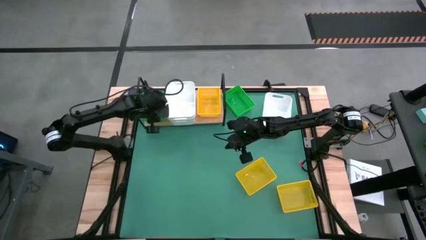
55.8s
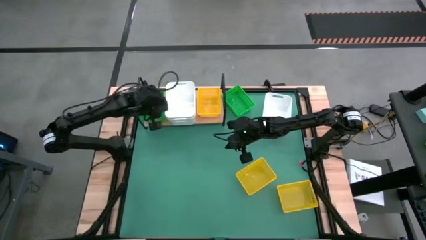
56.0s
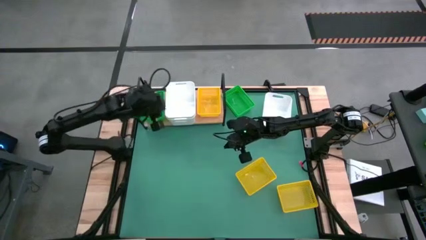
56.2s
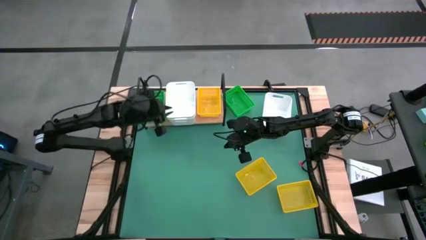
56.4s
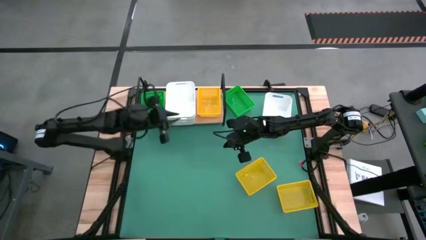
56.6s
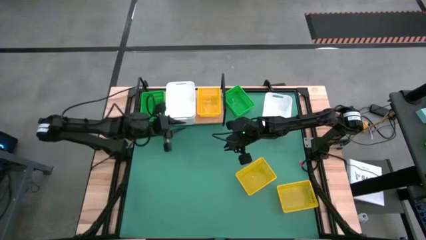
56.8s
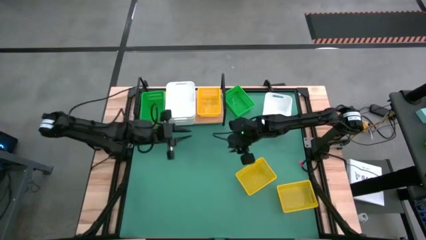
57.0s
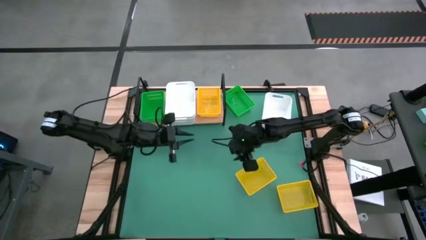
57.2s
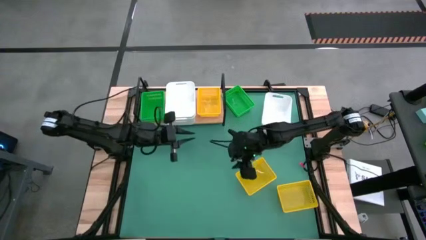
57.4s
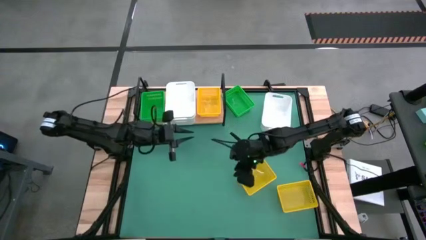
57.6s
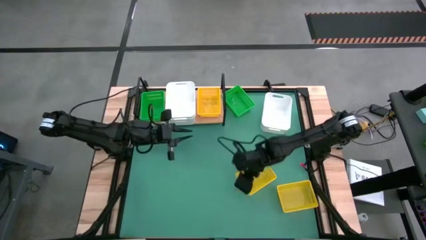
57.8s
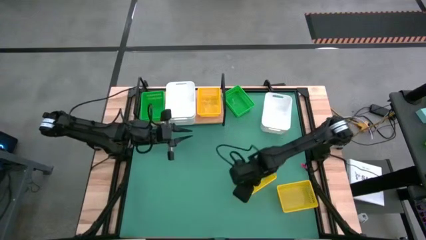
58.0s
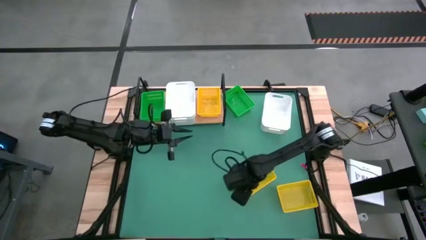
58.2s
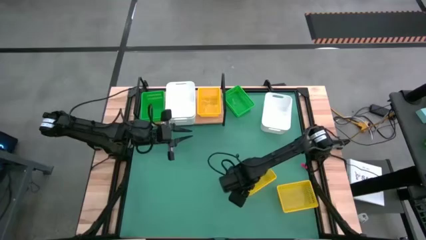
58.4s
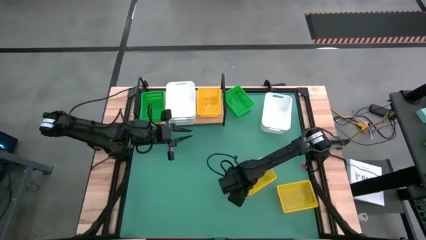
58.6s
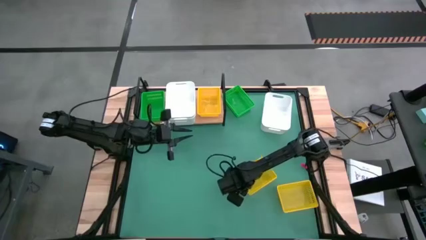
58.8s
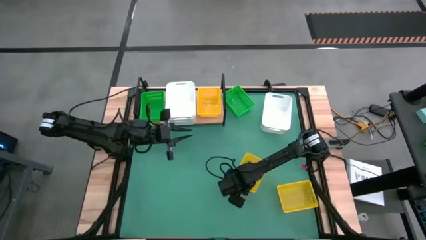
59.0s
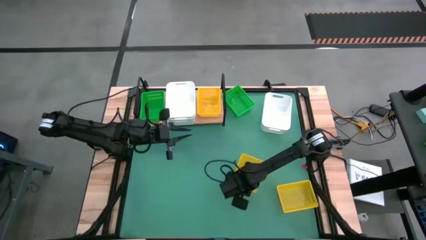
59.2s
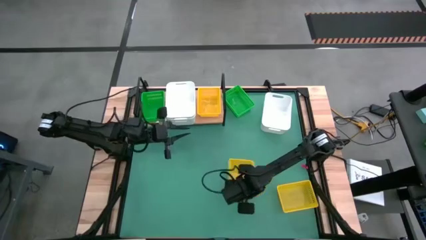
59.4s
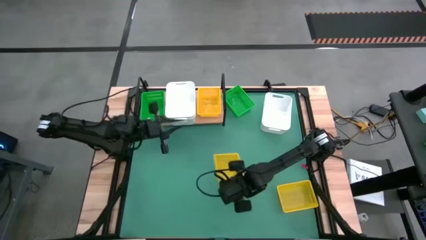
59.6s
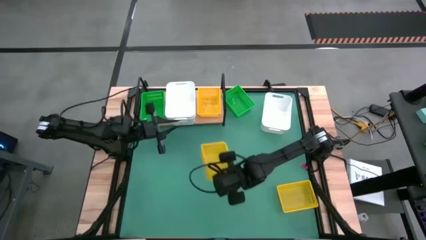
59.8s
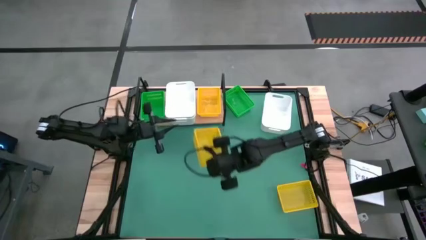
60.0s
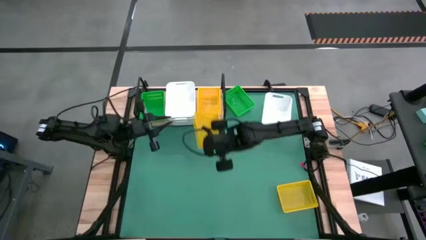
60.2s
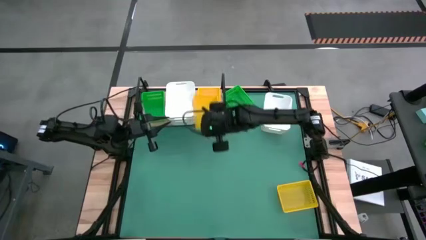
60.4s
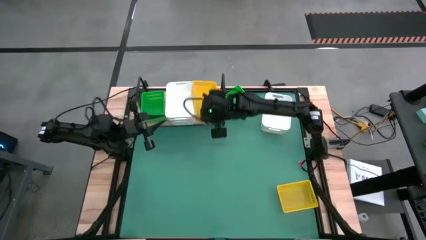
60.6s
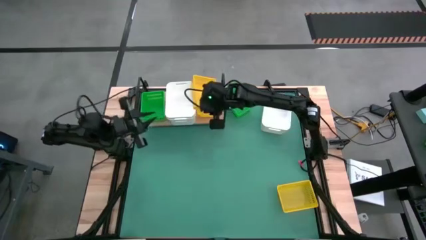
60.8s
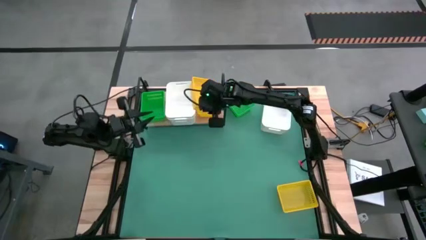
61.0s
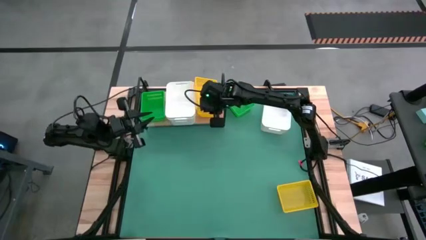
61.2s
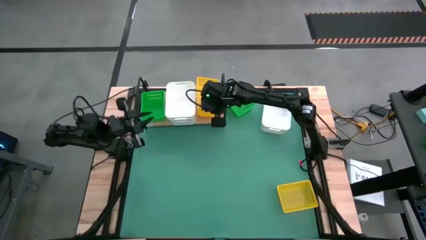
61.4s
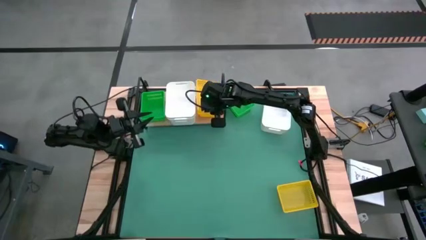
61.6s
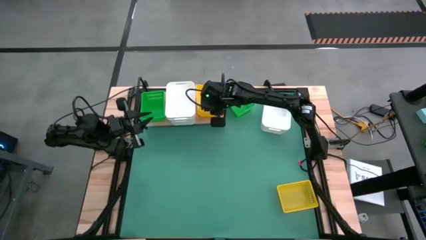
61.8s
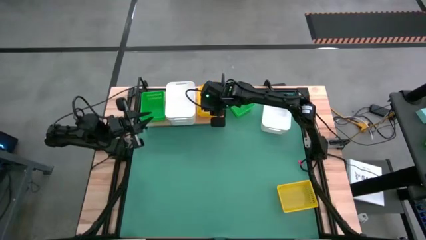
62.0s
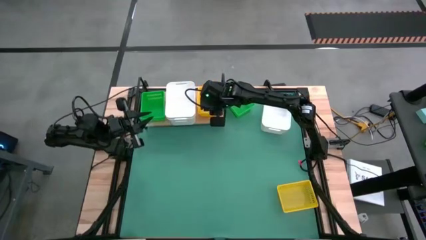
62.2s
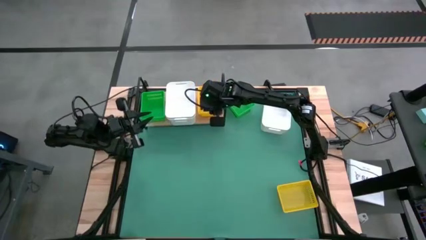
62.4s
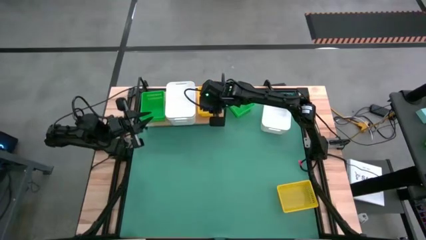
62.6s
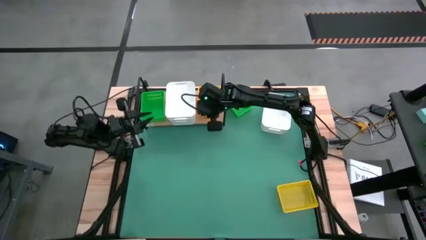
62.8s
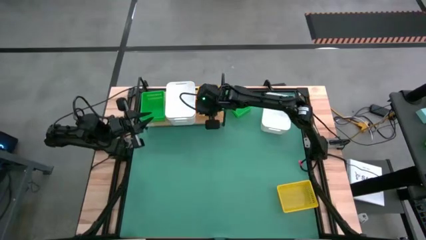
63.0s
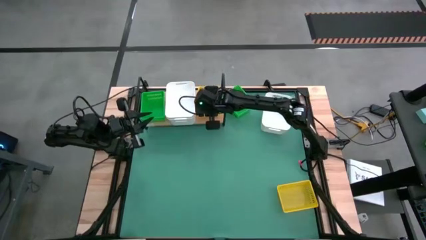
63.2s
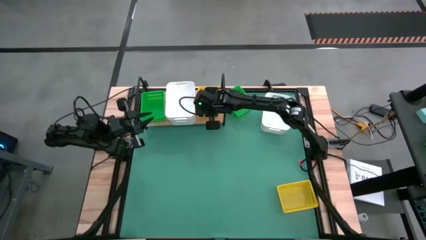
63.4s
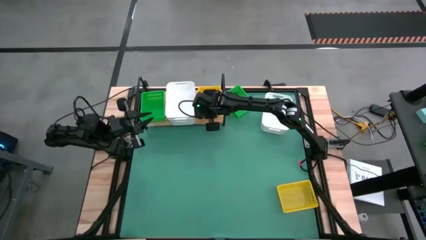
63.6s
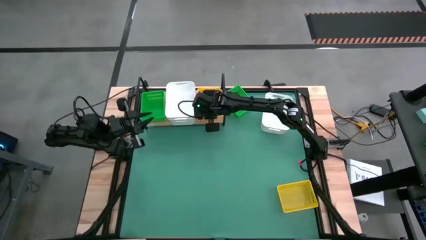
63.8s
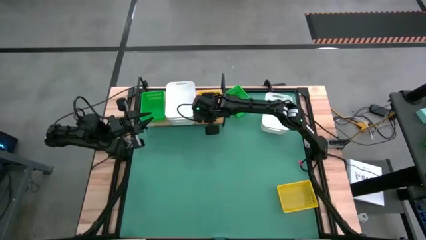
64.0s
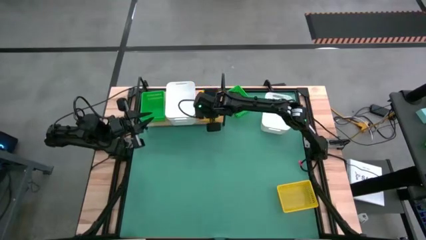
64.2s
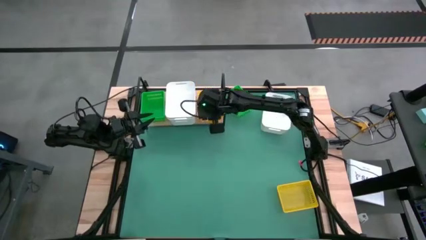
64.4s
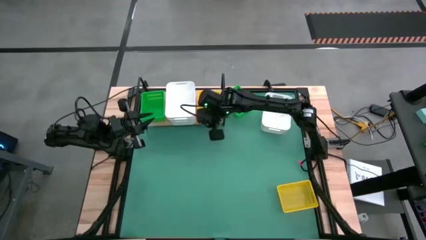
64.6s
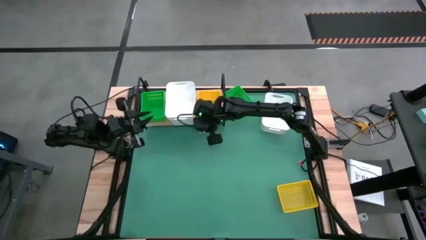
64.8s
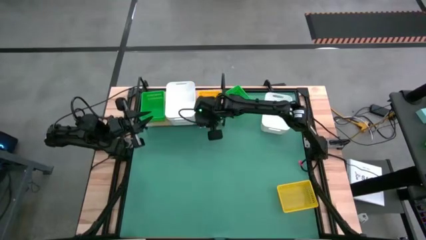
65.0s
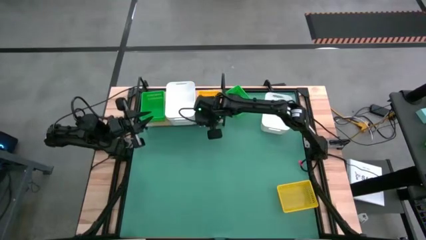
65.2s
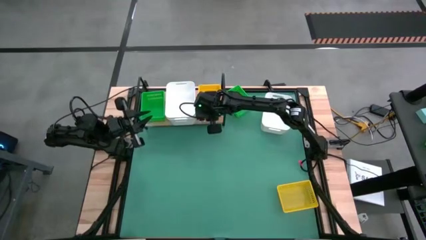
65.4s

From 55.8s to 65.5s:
Task: Stack baskets on shelf by color
Stack the left yellow bin on the top of the yellow bin on the shelf

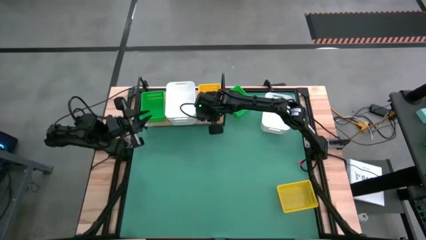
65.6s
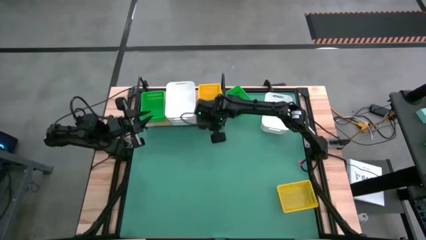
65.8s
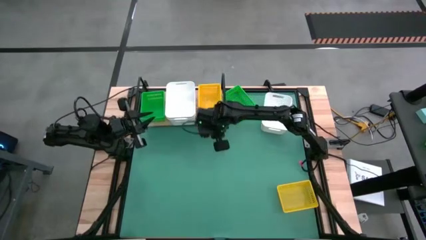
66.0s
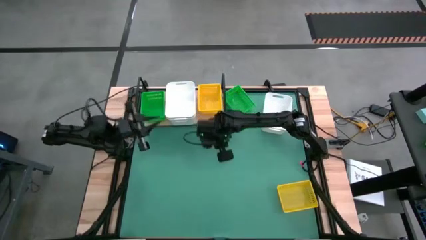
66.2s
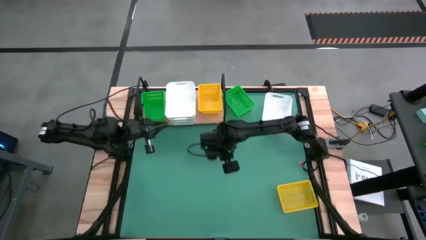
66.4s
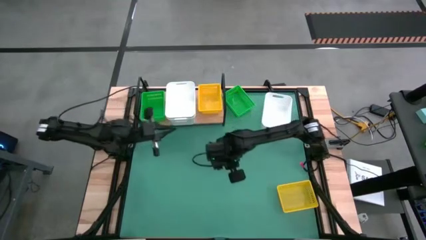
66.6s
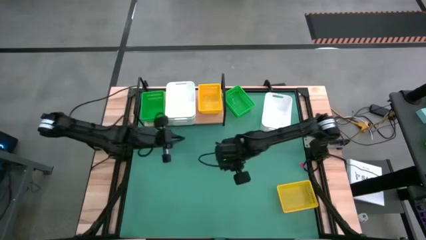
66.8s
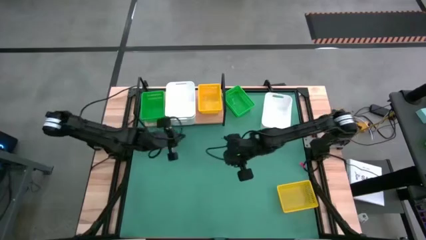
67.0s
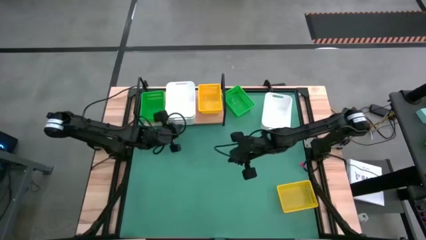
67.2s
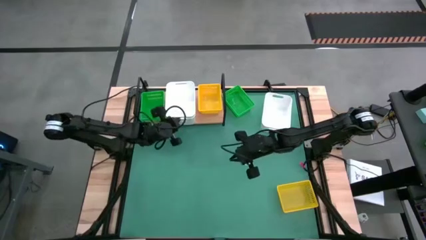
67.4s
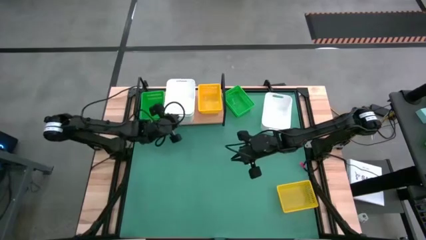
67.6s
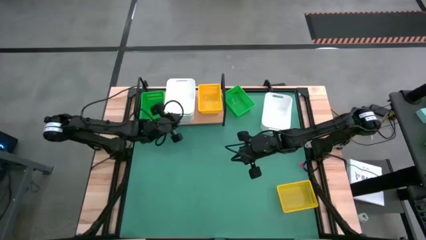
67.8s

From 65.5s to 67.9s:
Adjust the white bins on the shelf
